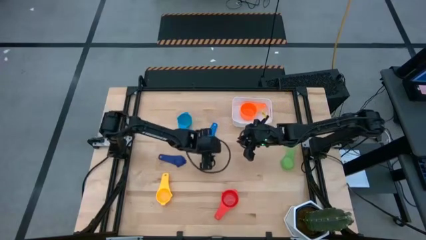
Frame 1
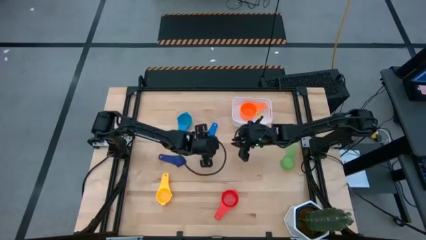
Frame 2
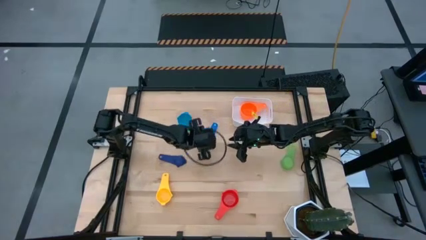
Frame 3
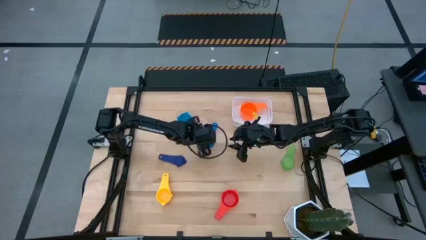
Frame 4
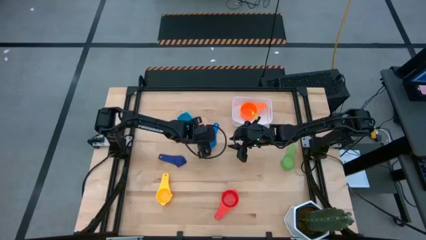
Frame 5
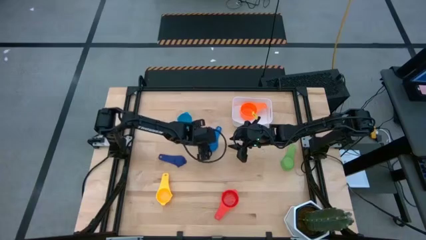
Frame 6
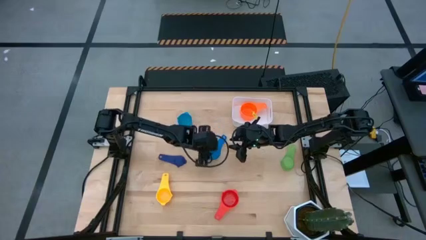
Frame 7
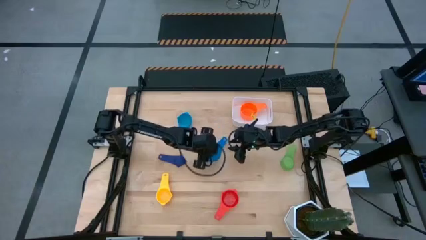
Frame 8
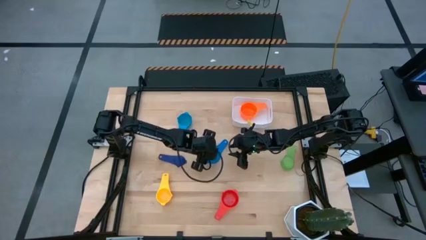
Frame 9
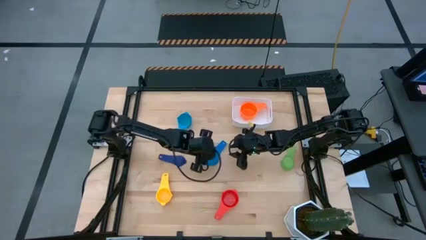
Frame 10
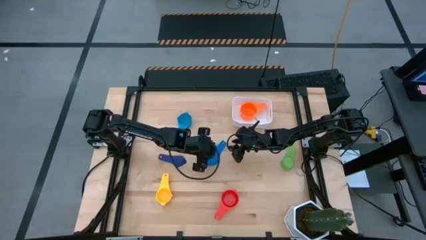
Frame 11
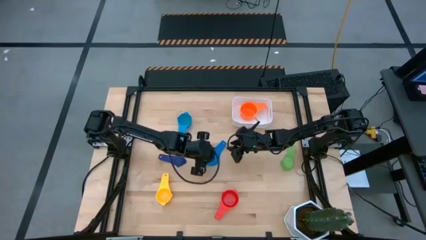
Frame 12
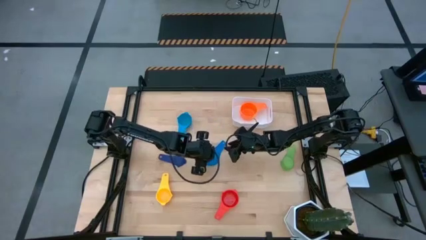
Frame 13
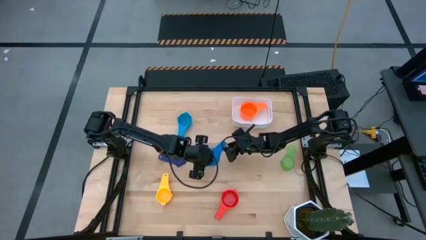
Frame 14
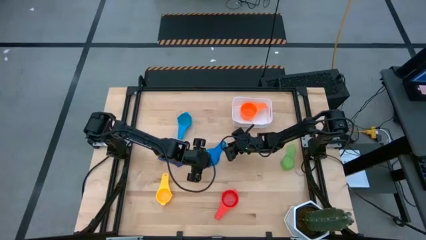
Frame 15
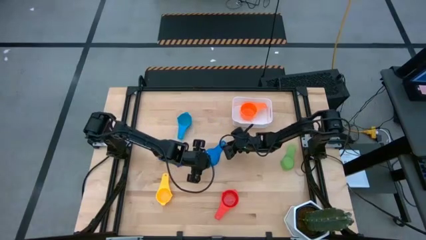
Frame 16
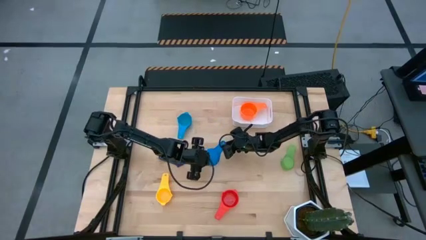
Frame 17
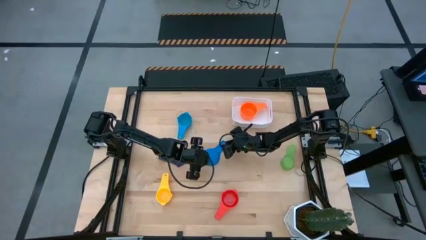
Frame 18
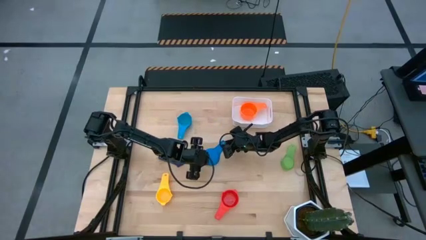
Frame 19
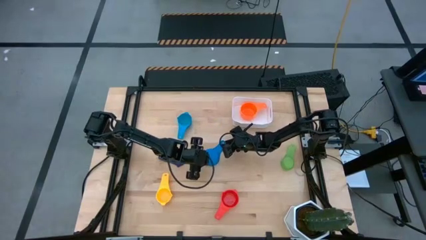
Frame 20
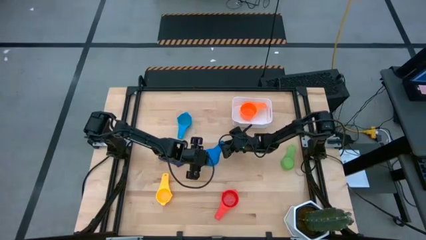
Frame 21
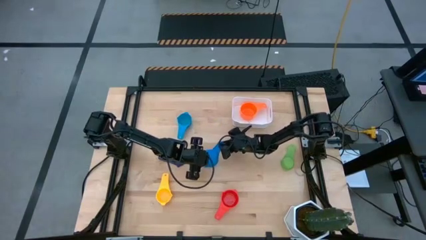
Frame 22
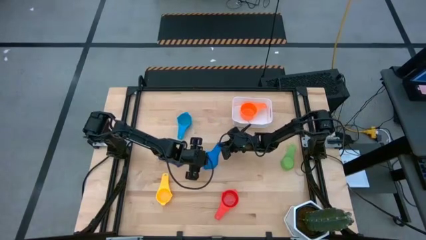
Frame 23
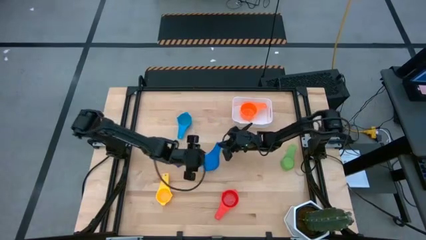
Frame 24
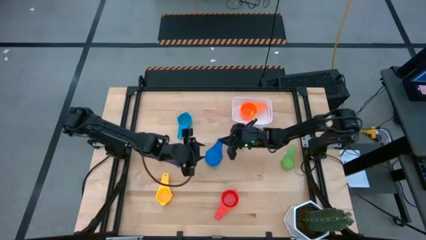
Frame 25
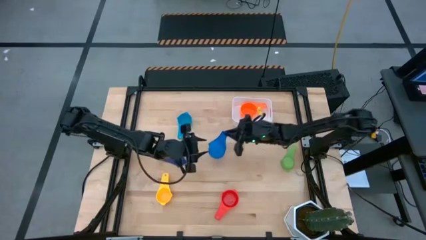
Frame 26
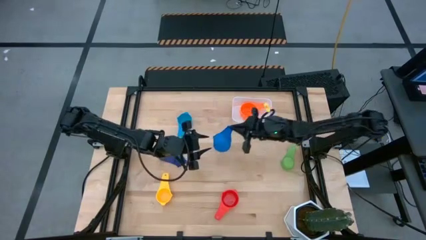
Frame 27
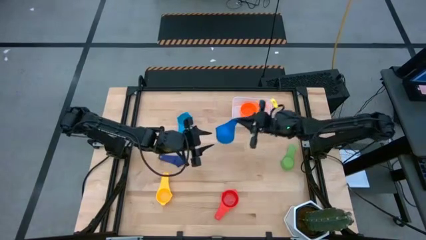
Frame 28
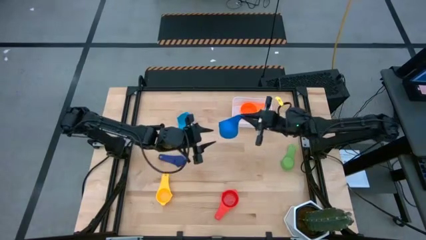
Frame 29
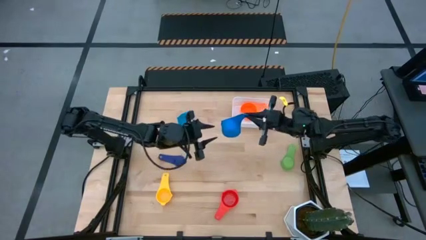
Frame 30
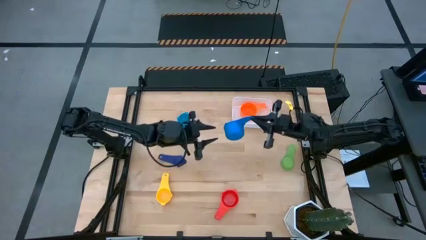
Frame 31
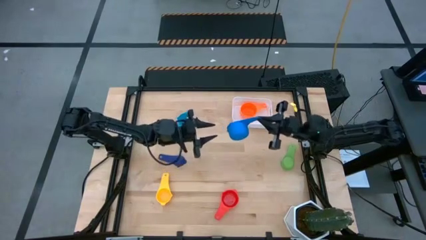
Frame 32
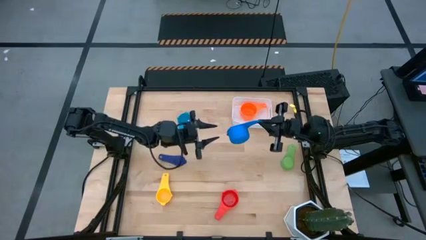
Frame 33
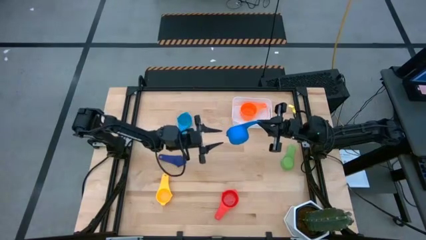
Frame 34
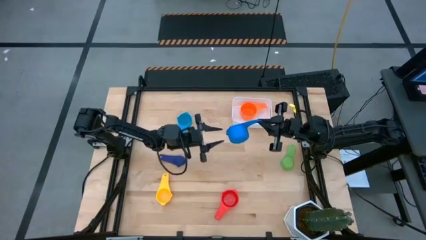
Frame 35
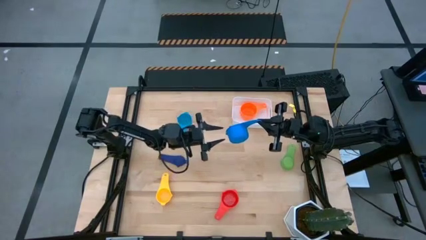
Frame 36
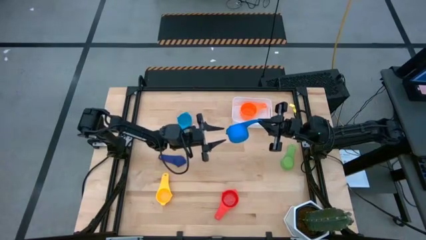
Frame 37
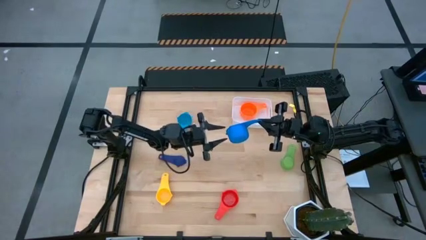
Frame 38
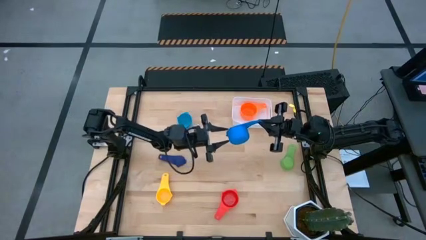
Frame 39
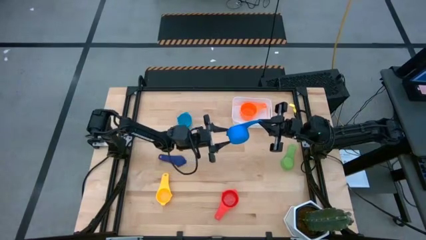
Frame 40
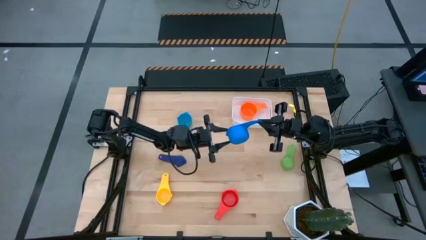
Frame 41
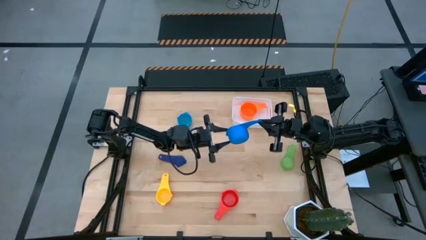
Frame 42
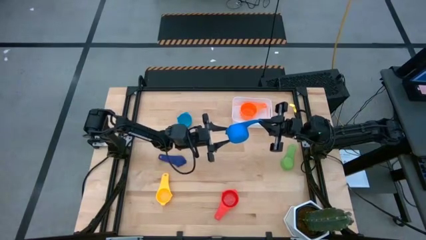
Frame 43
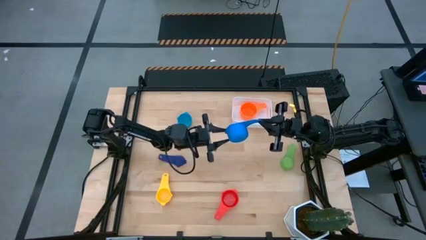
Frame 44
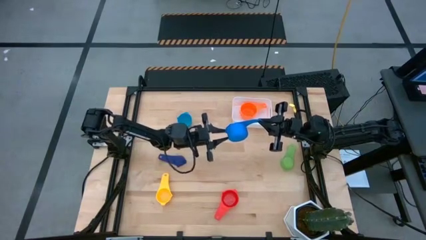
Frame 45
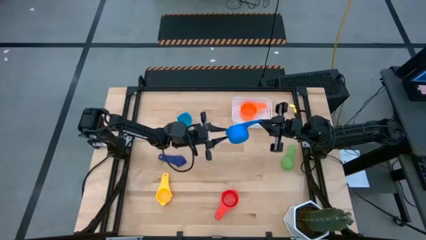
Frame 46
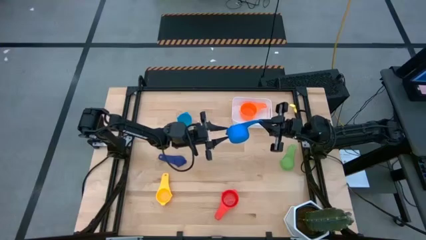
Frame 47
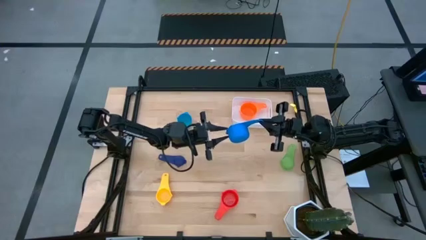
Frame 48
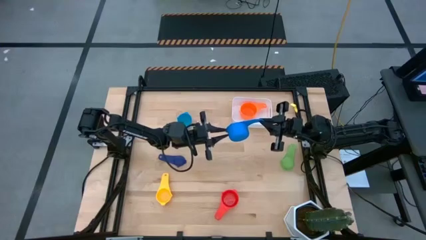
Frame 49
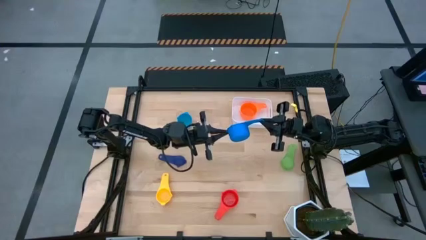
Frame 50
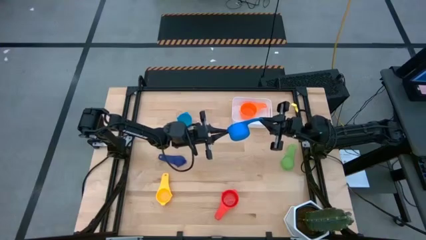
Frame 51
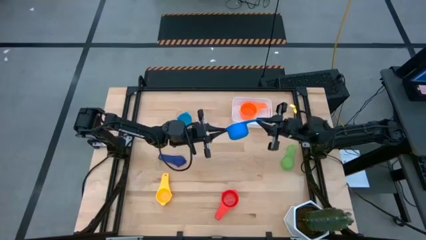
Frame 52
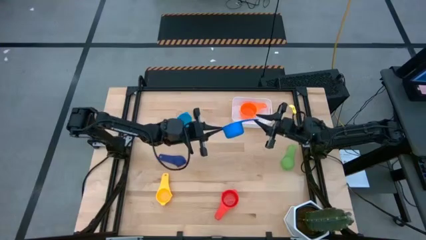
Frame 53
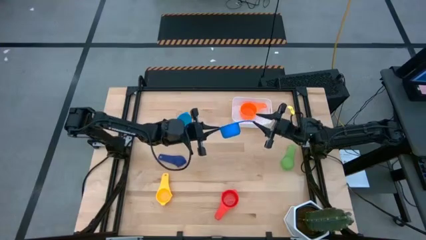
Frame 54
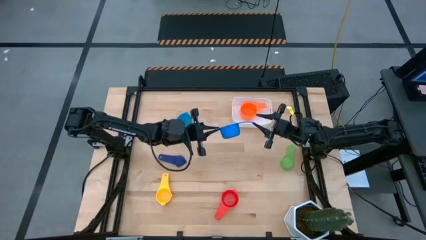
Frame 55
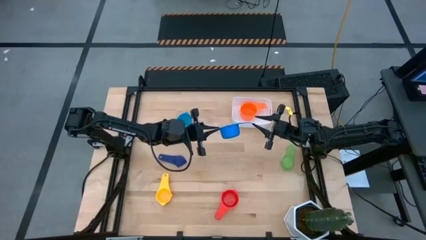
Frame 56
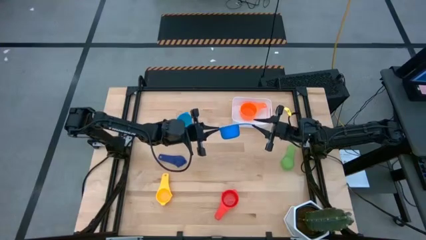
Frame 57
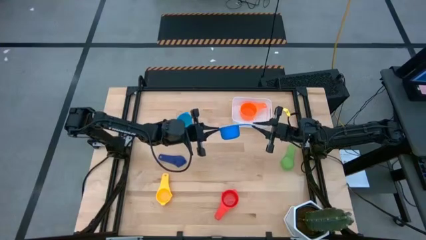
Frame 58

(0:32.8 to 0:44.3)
Task: Nest measuring cups in basket
Stack the blue measuring cup on top of the orange measuring cup in the white bin
